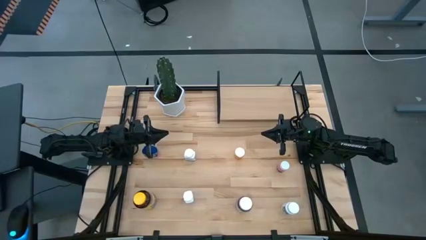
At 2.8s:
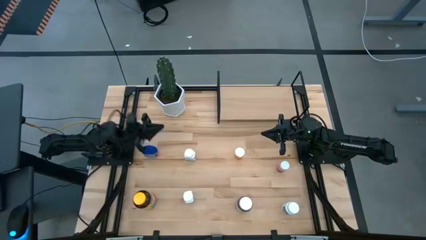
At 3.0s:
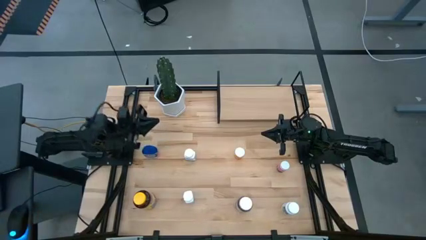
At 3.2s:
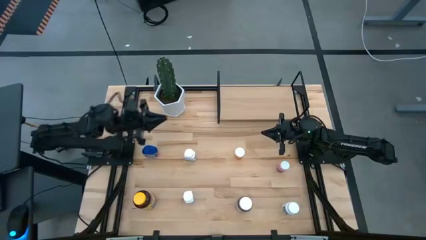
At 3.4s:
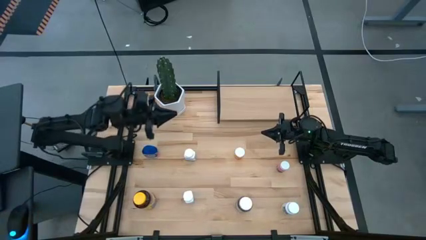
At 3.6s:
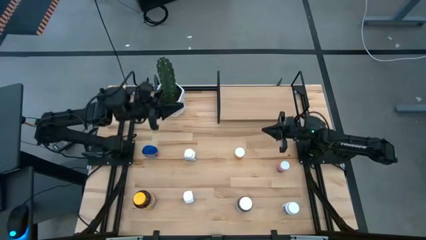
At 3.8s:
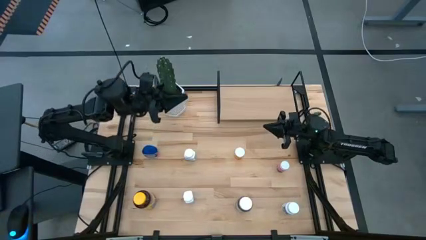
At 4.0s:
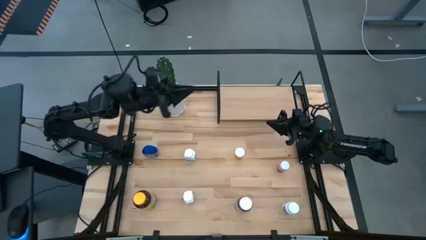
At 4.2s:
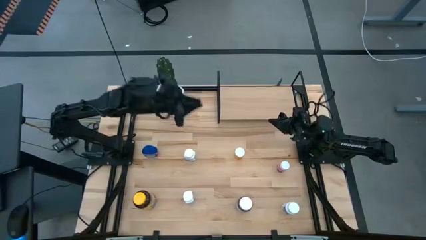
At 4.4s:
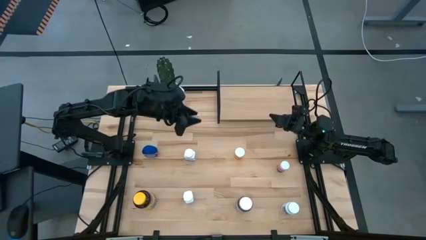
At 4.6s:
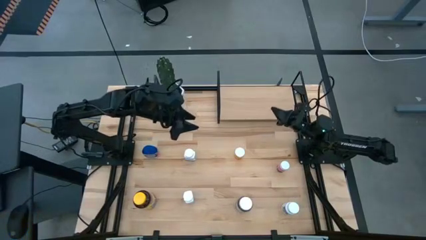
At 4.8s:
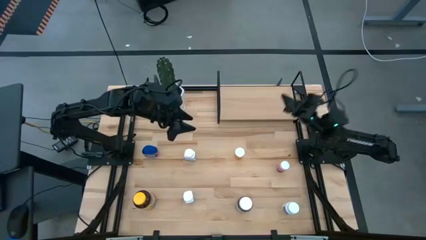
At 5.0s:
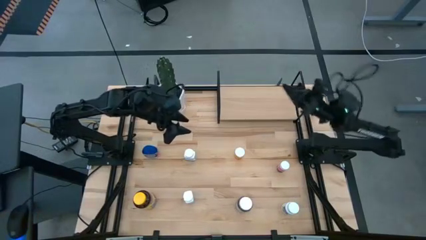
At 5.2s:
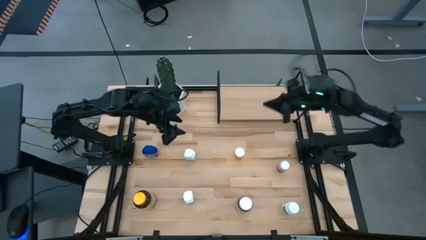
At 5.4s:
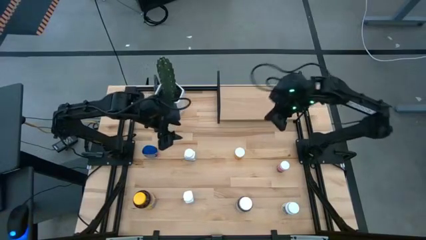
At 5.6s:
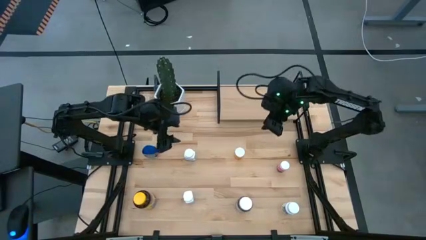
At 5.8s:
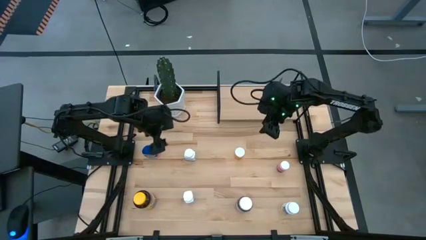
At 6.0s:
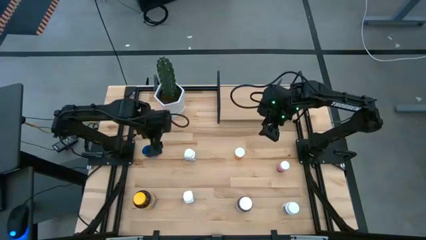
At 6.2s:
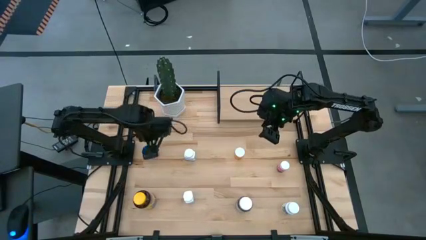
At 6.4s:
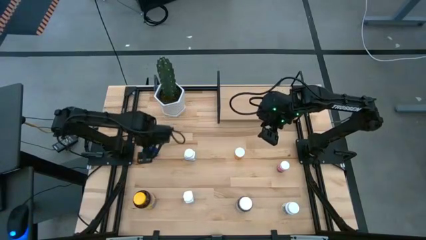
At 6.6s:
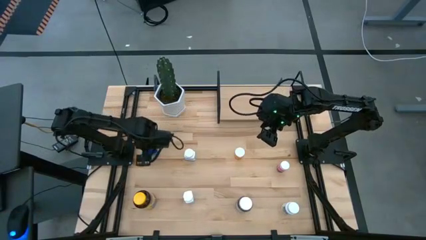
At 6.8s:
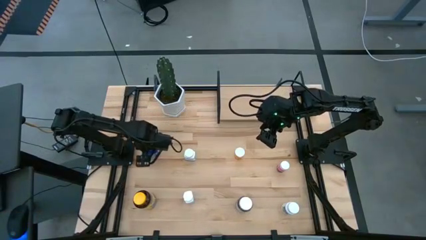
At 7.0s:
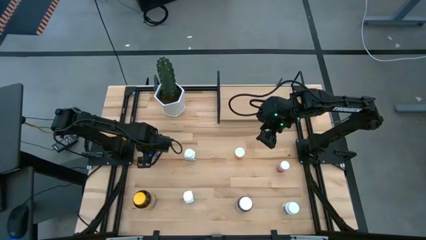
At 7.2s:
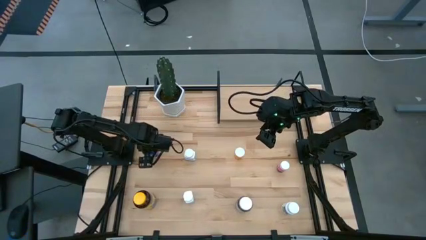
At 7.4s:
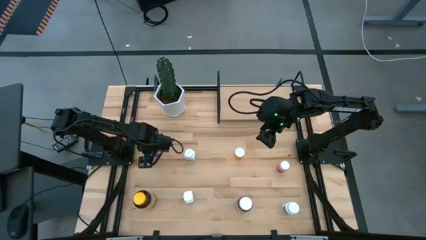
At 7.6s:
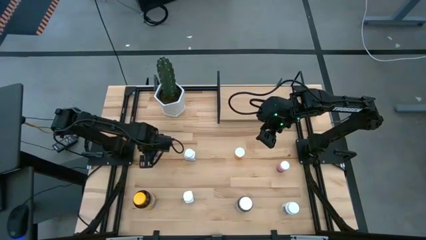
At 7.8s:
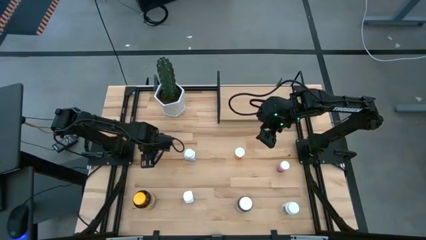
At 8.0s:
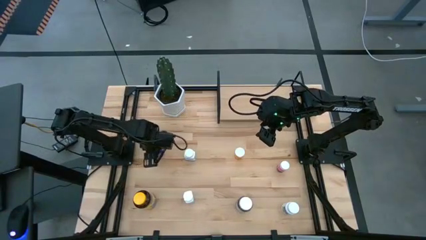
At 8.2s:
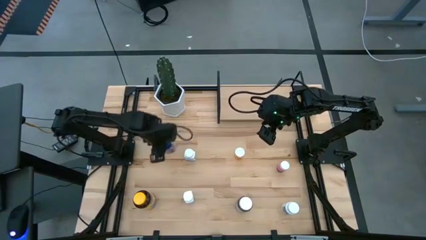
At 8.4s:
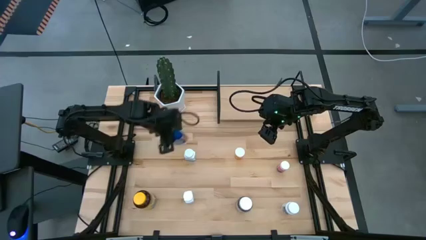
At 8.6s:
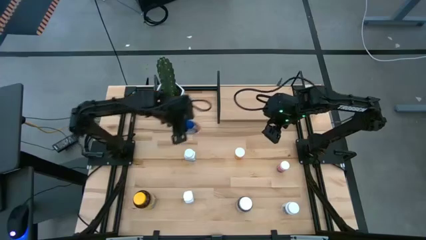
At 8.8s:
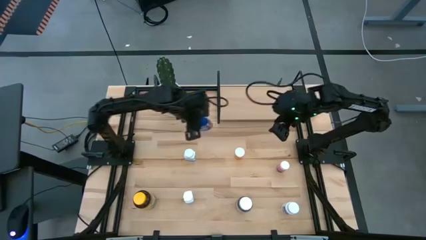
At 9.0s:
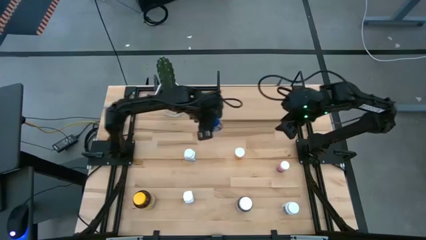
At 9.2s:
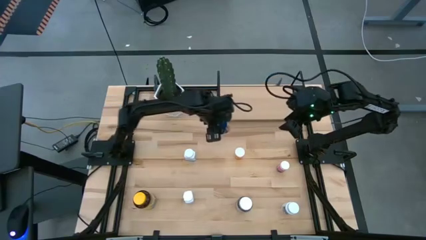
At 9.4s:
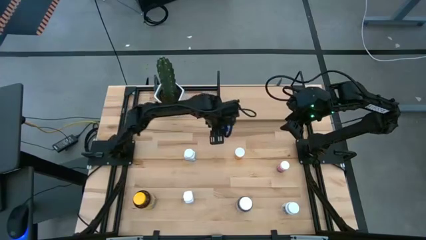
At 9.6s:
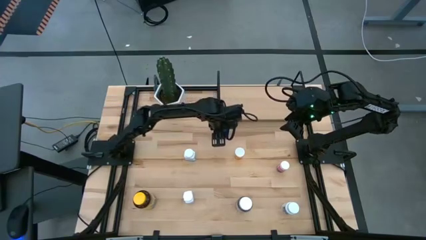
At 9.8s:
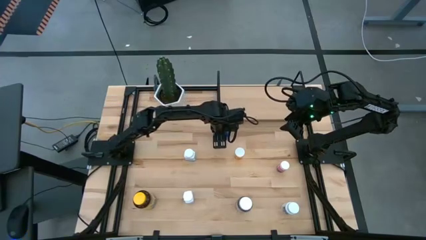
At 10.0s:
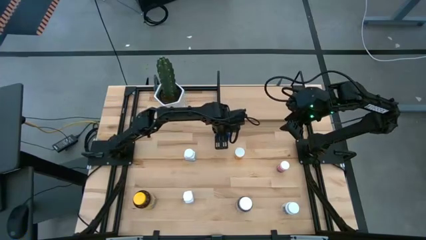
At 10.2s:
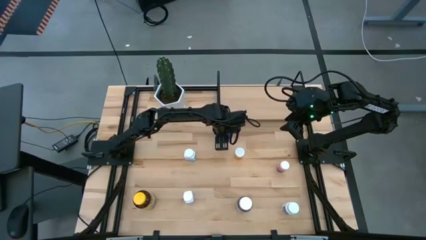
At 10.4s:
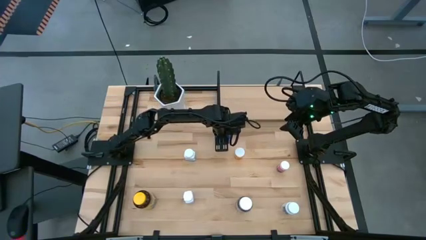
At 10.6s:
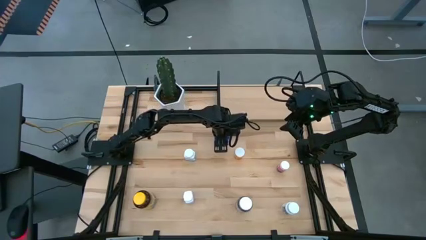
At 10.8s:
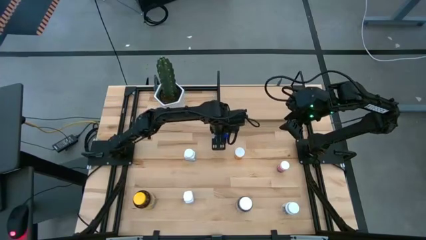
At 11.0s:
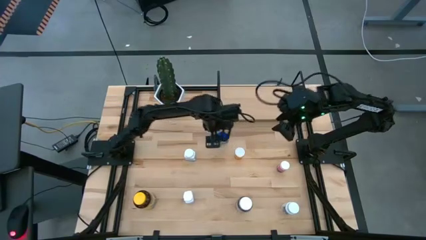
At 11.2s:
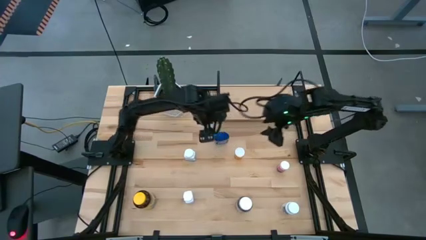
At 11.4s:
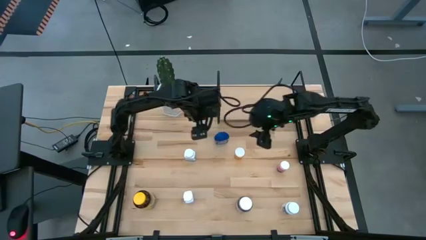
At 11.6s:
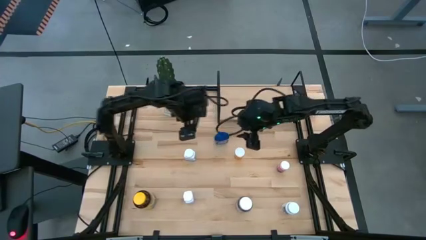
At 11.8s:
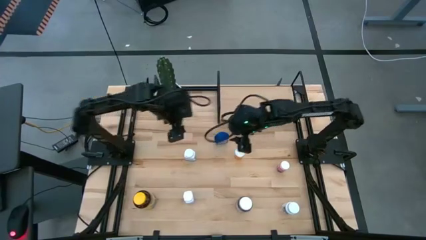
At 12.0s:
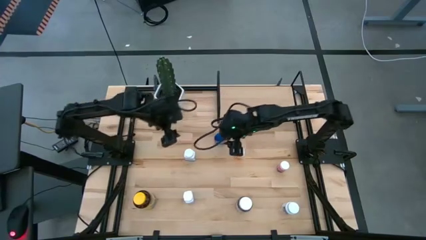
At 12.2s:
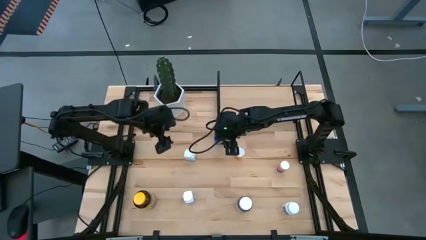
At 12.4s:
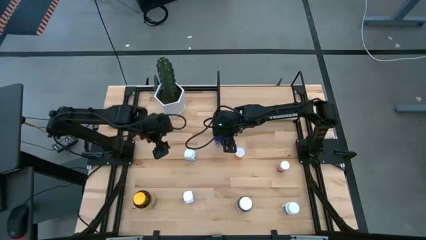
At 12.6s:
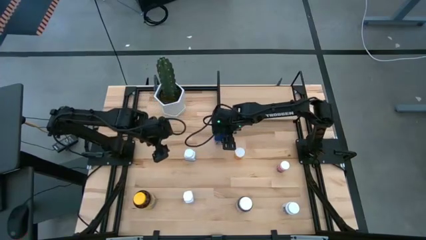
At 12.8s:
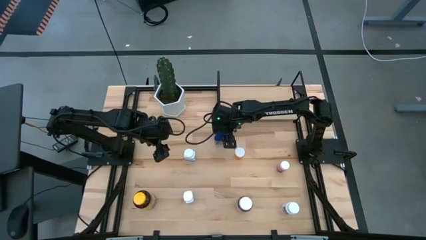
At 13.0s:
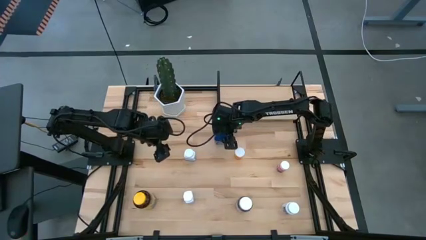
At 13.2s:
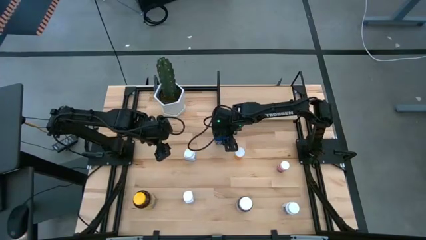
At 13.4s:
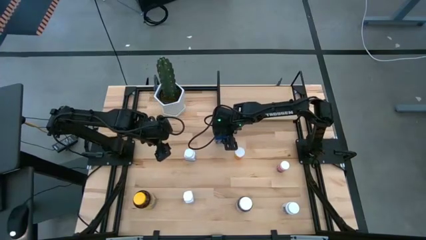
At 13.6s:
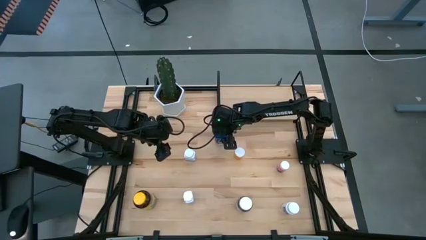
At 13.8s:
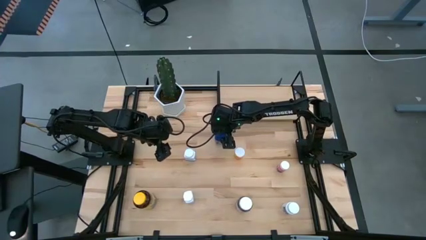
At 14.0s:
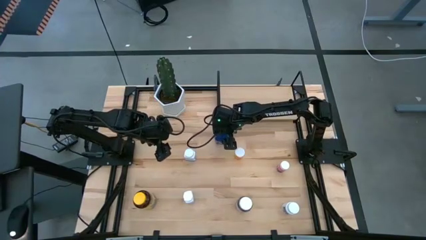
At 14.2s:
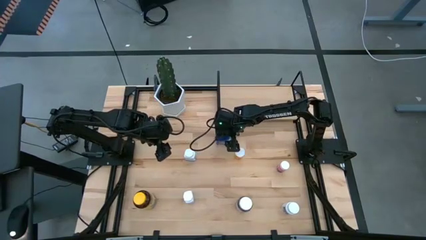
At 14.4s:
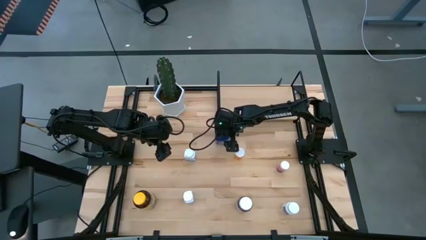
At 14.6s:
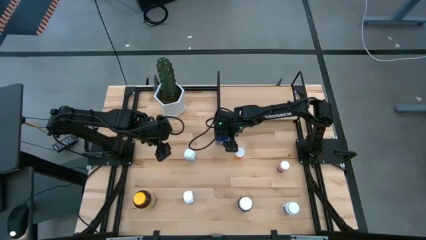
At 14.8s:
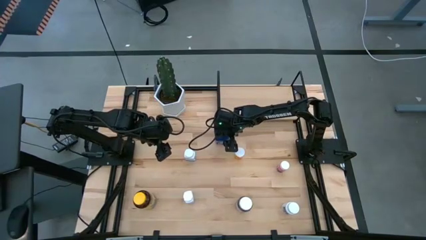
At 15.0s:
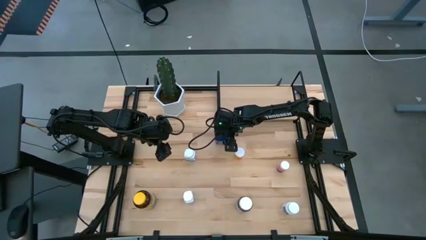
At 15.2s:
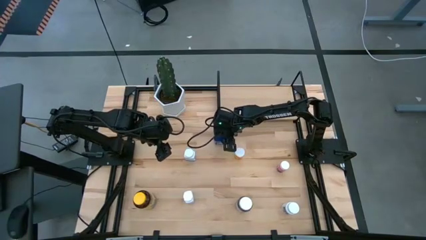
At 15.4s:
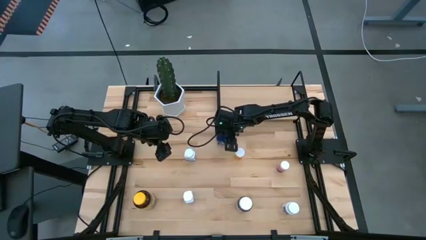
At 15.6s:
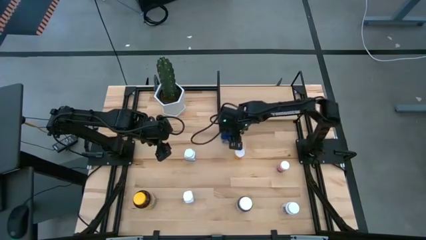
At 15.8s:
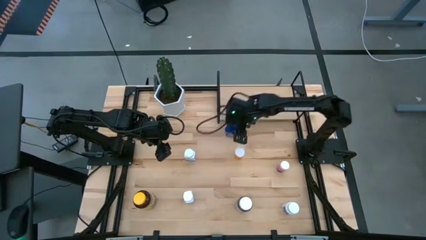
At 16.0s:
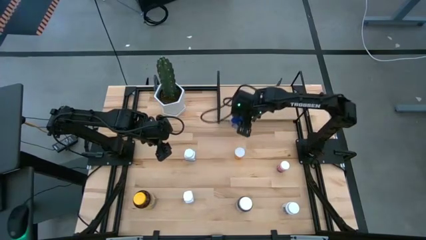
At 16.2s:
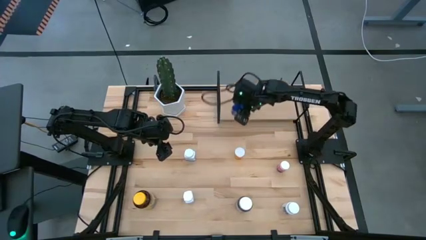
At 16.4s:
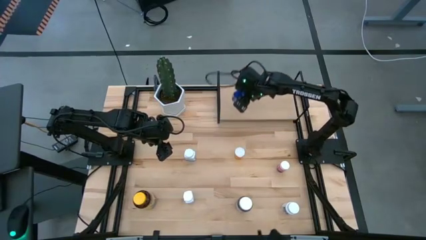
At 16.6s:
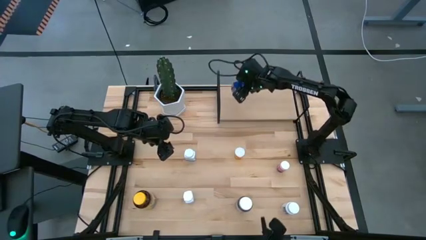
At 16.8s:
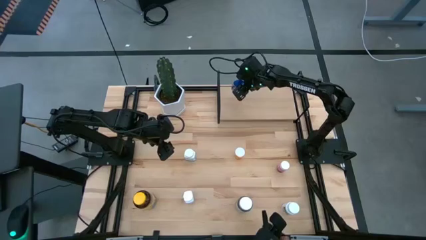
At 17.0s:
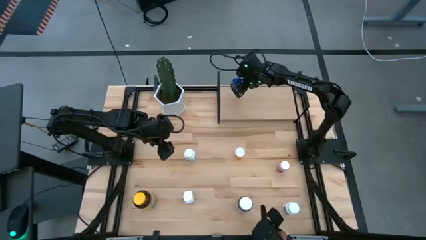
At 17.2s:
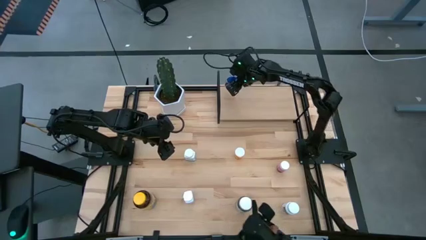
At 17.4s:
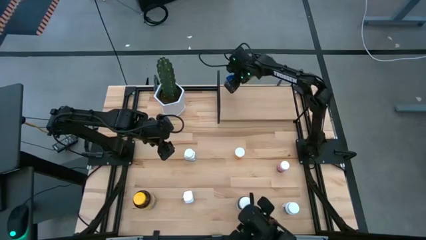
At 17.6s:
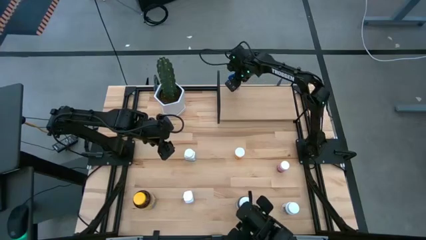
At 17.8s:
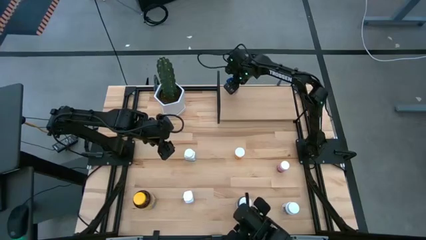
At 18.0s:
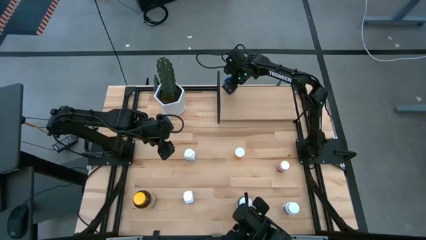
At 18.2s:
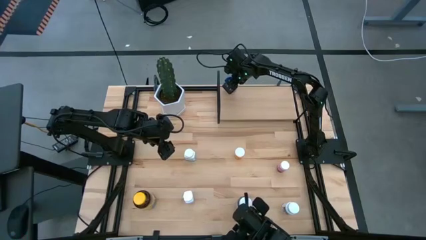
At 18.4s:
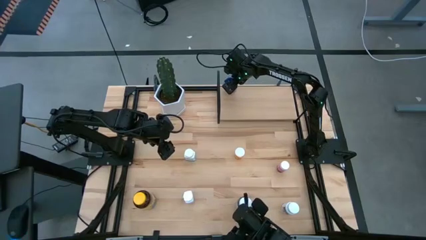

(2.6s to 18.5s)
Task: Pick and place medicine bottles onto shelf by color
Put the blue pill bottle on the shelf
